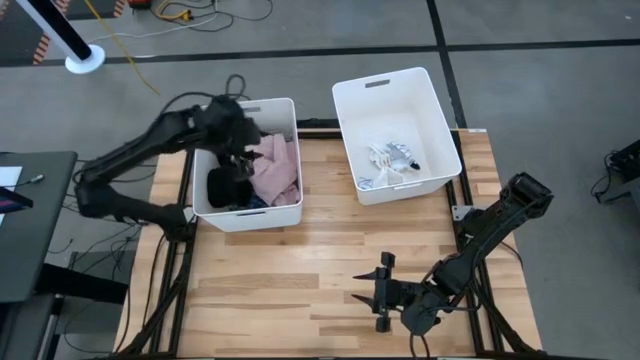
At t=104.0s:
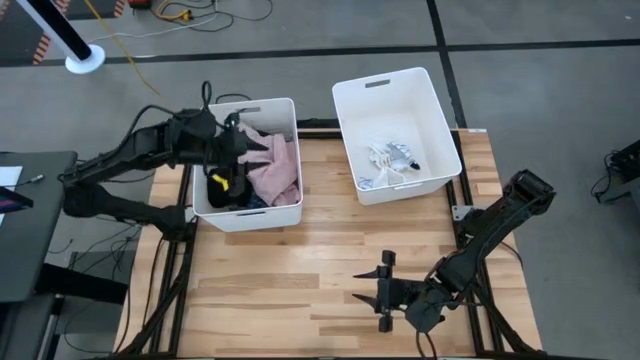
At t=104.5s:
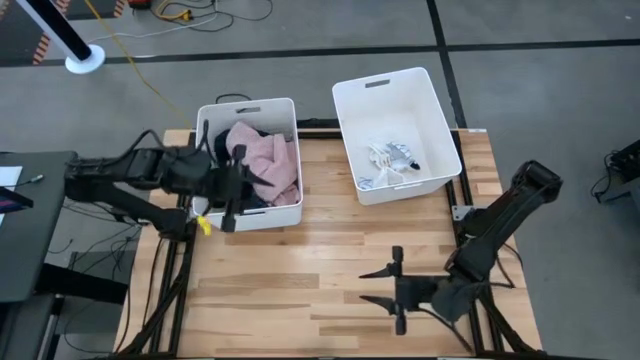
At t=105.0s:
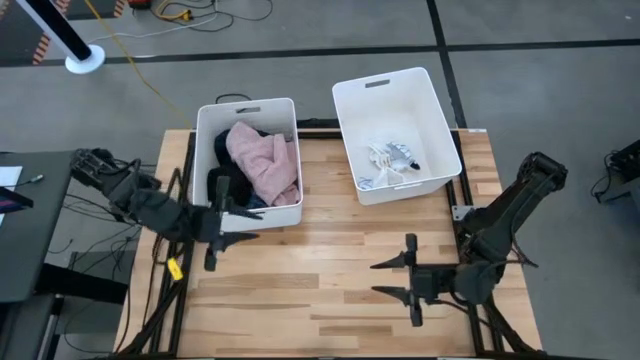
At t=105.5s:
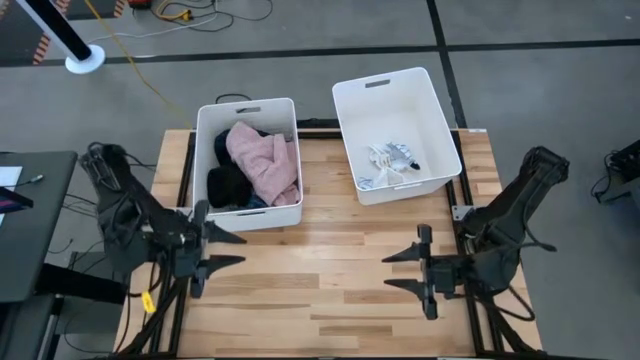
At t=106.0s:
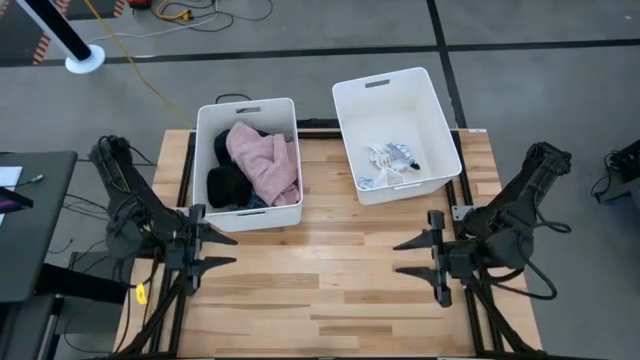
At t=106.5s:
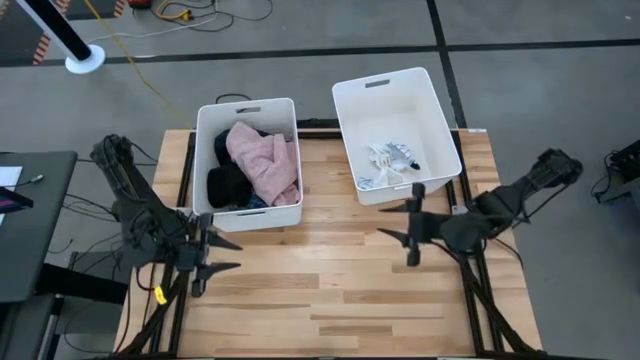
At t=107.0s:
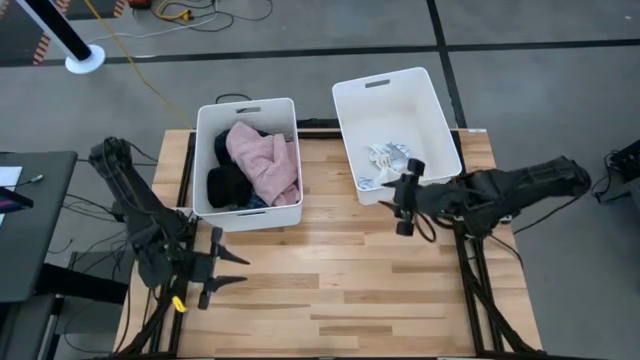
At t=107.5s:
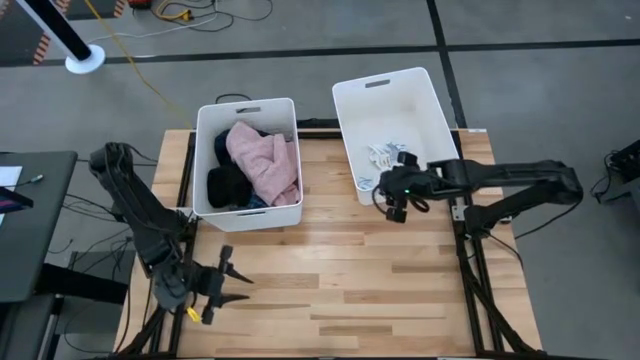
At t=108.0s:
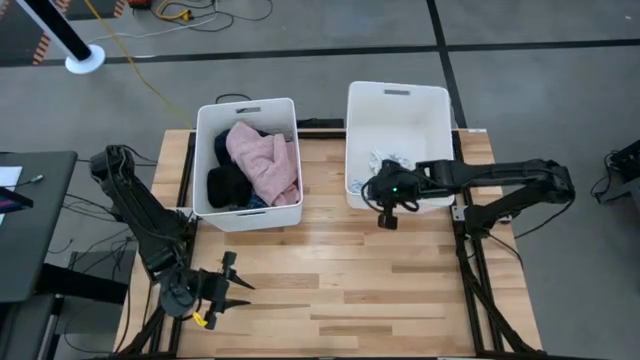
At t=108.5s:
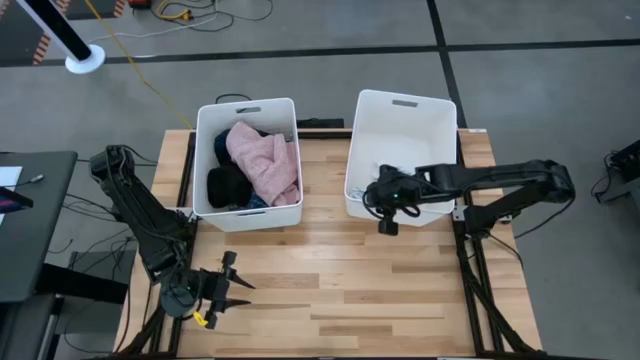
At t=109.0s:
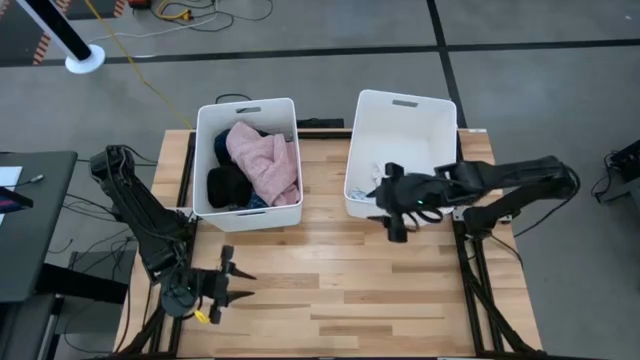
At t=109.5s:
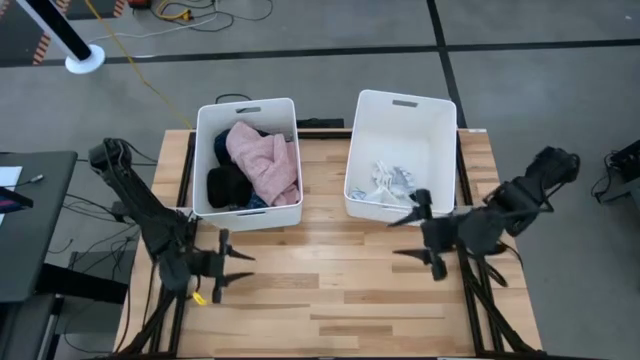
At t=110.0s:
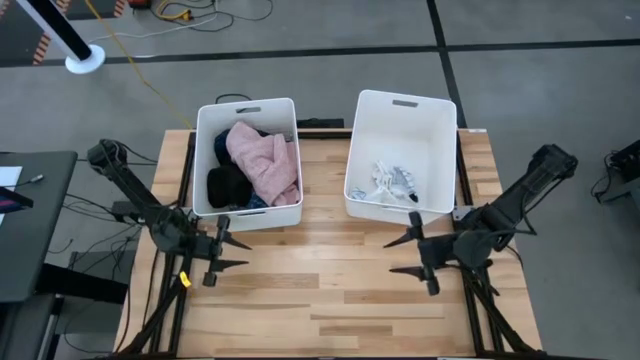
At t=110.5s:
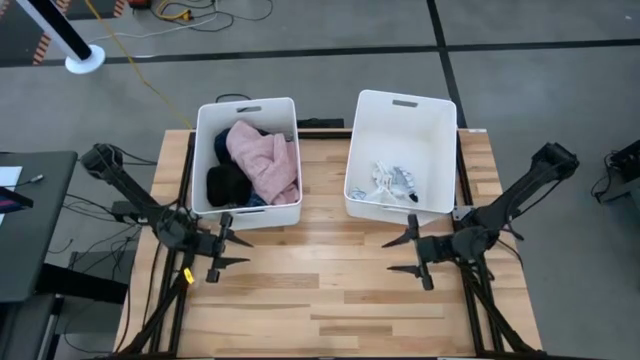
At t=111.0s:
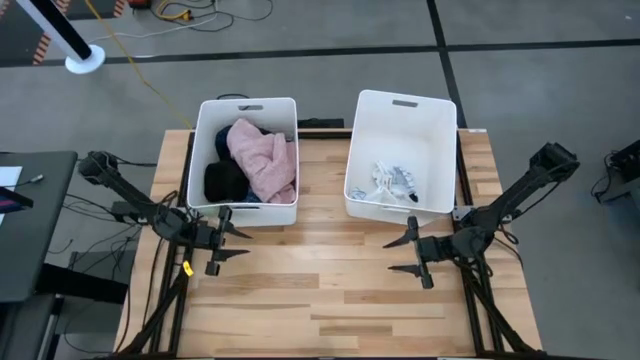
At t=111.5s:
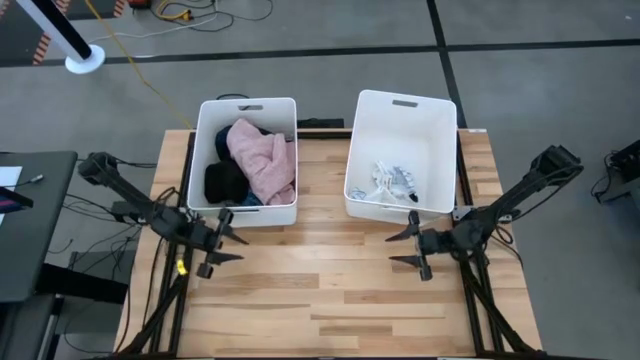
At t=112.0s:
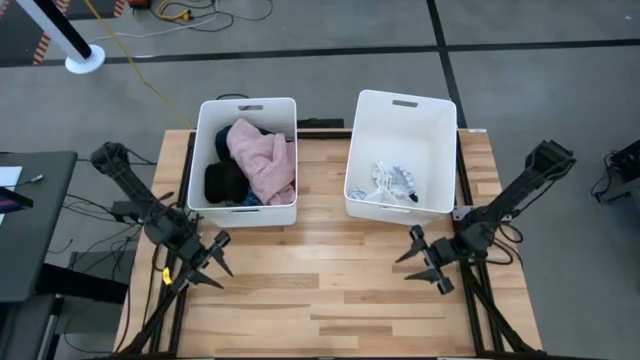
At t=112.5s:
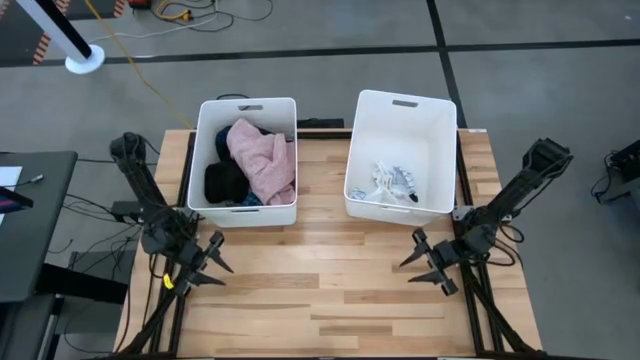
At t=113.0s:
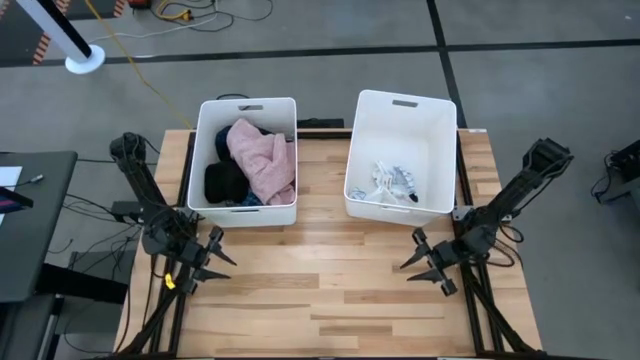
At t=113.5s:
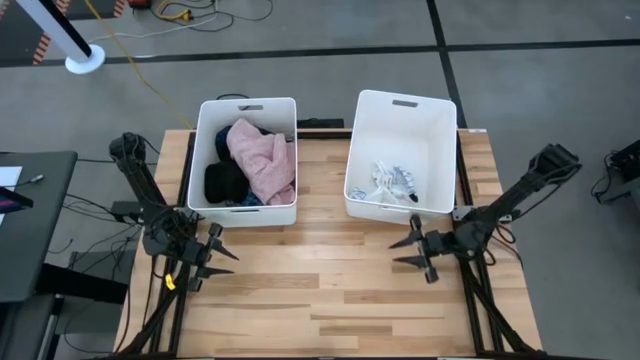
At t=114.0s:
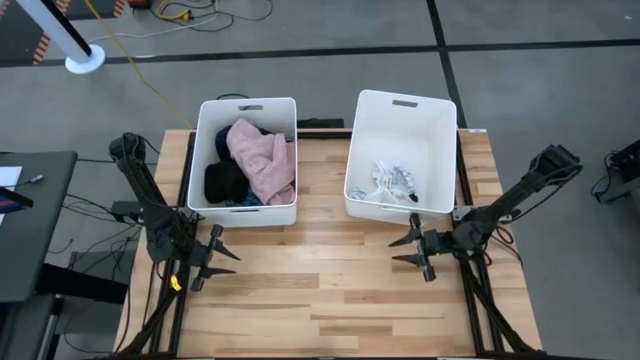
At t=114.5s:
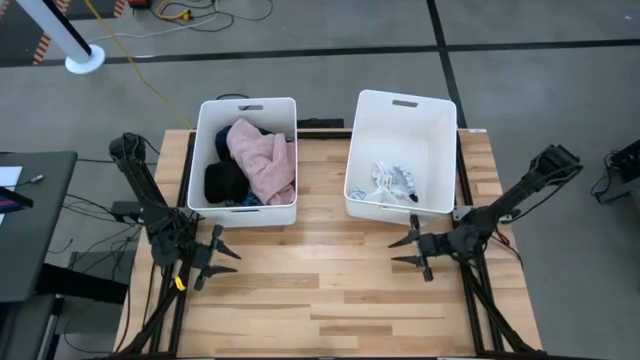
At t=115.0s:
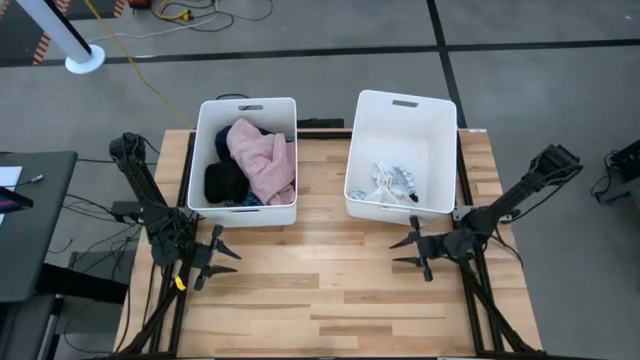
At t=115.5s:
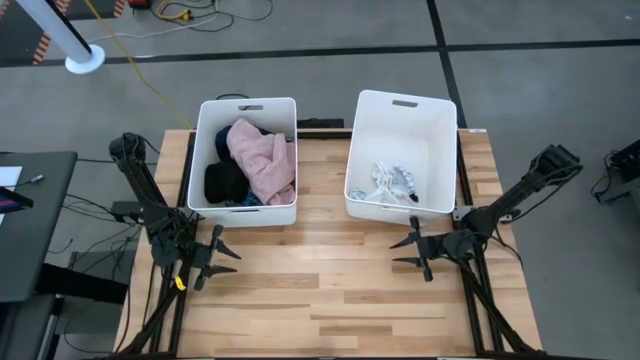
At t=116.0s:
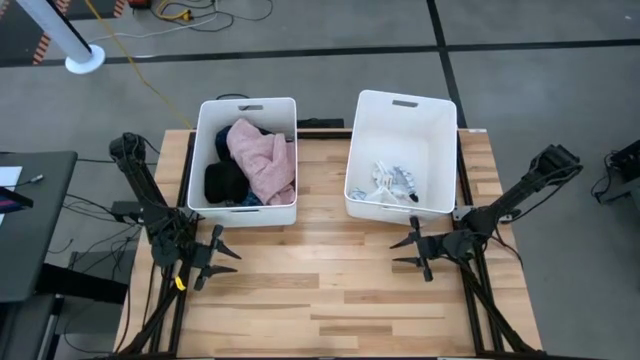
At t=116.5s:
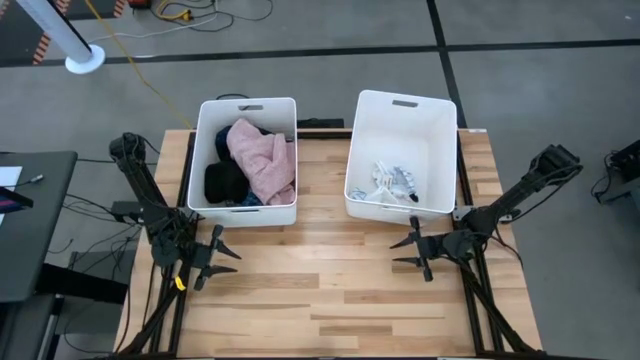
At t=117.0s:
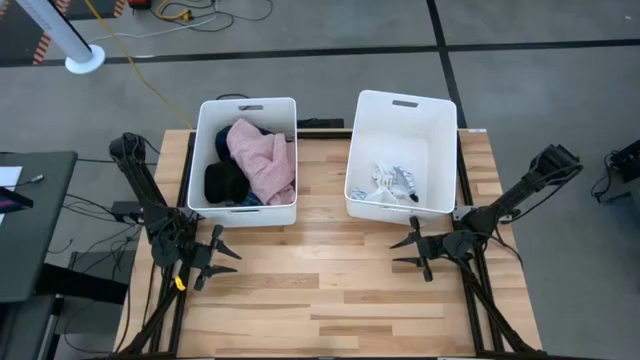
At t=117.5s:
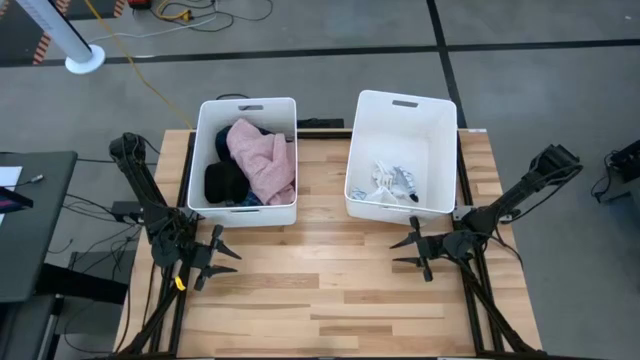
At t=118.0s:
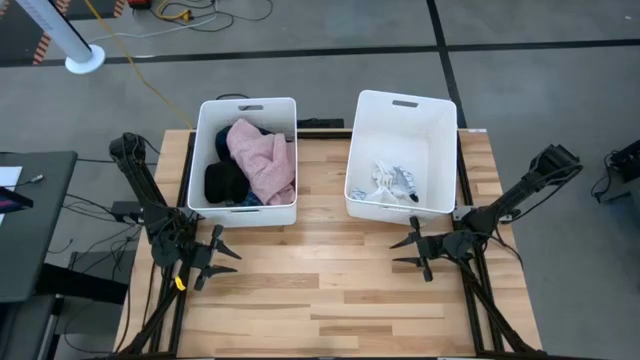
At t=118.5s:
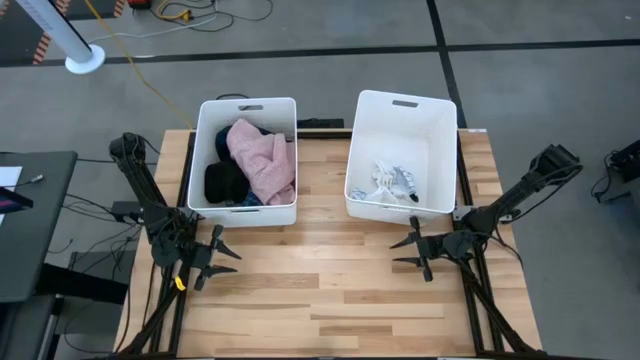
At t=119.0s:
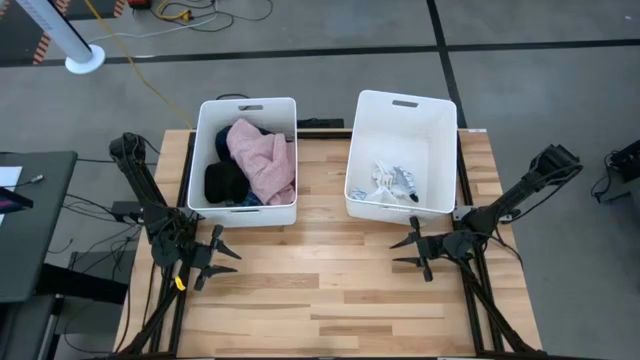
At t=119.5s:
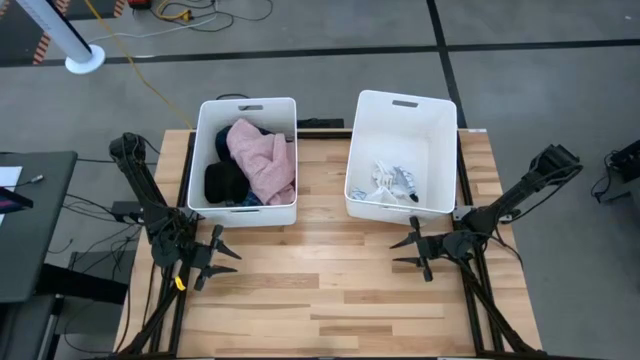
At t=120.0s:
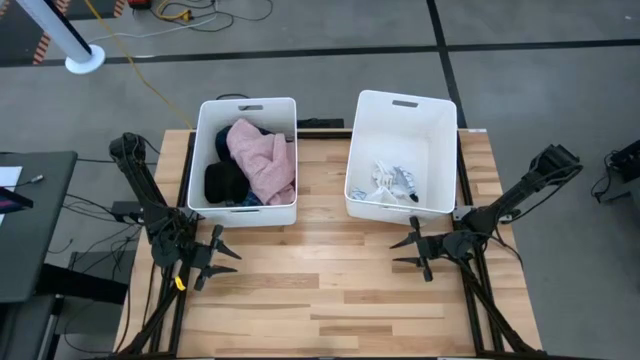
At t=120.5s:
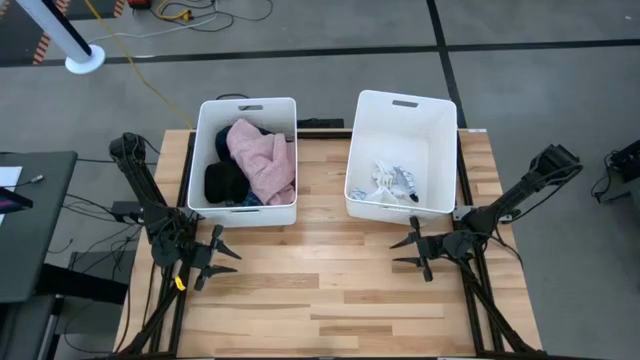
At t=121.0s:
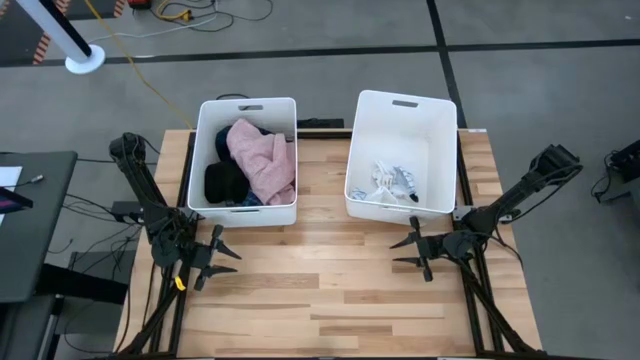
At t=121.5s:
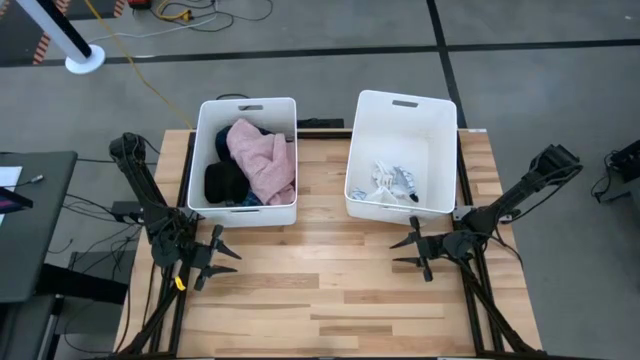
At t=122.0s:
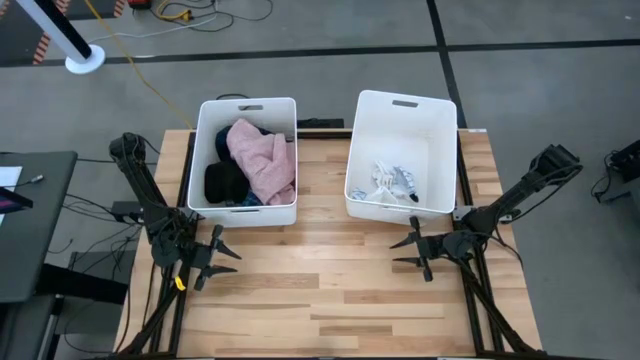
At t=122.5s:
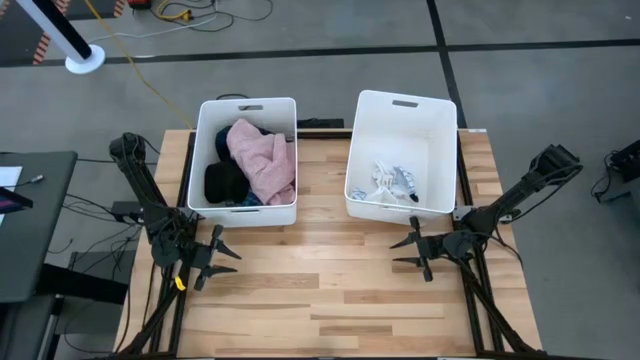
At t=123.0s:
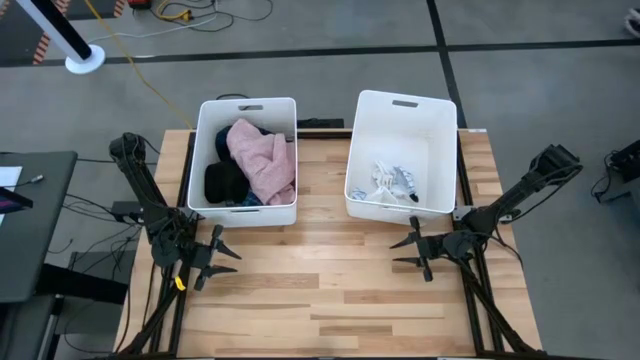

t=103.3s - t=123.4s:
Task: Sort clothes
Return to Home Position
